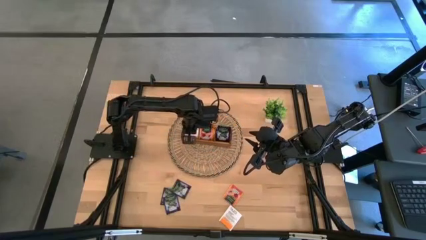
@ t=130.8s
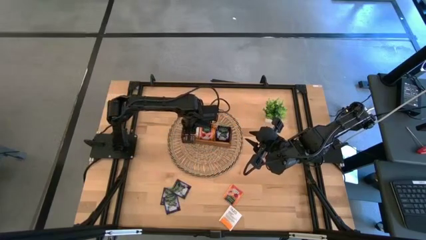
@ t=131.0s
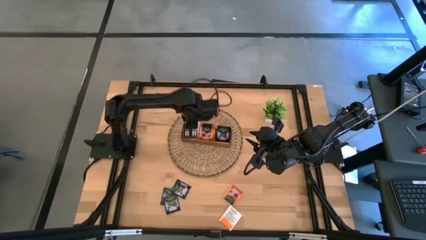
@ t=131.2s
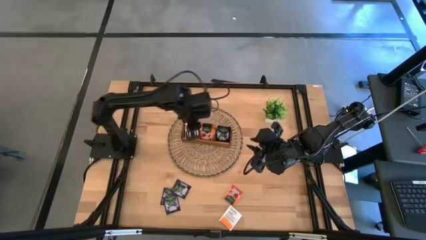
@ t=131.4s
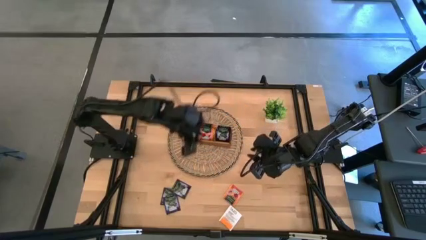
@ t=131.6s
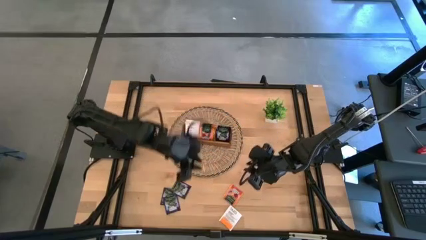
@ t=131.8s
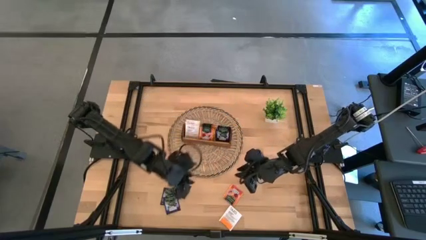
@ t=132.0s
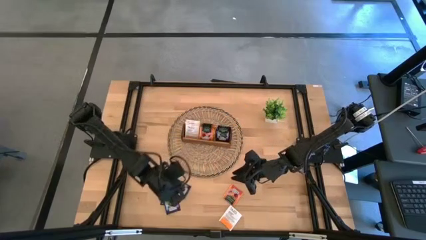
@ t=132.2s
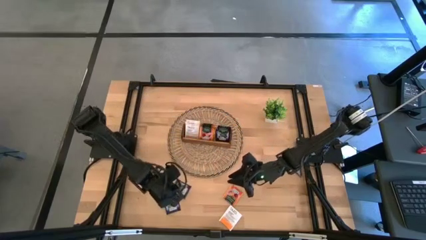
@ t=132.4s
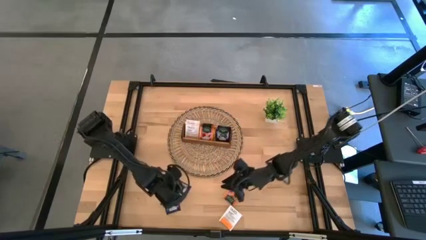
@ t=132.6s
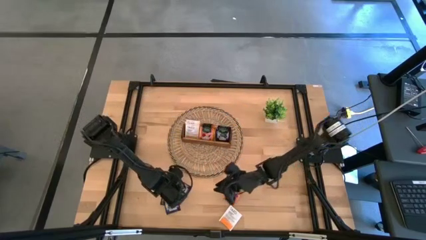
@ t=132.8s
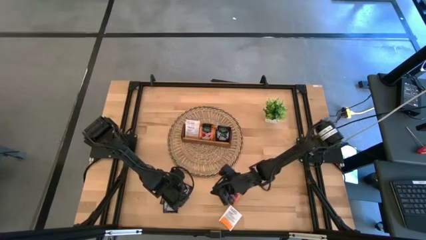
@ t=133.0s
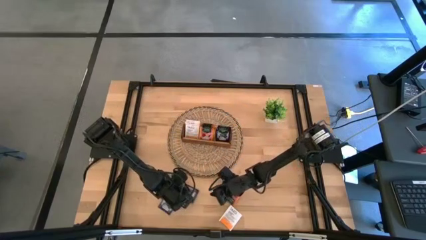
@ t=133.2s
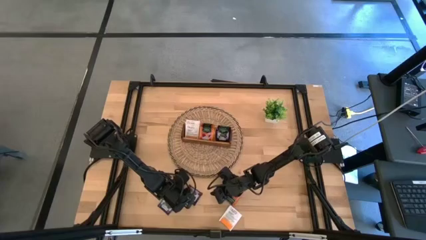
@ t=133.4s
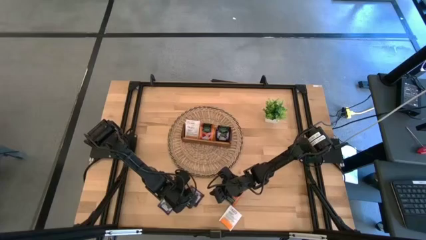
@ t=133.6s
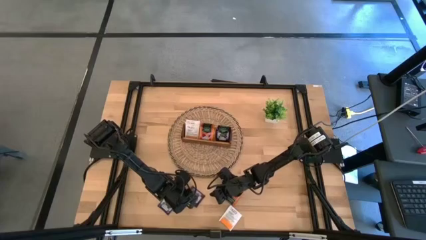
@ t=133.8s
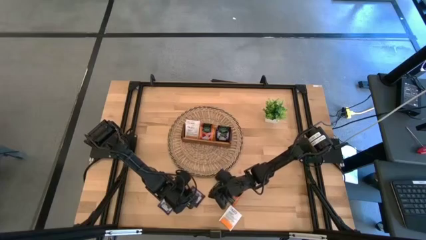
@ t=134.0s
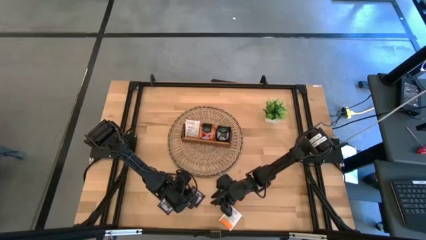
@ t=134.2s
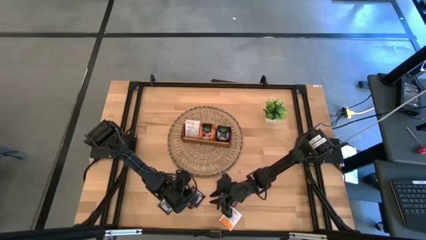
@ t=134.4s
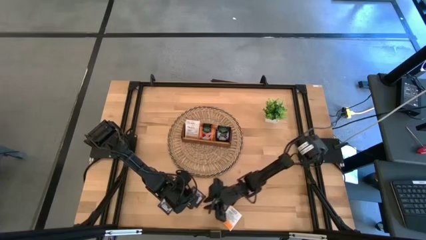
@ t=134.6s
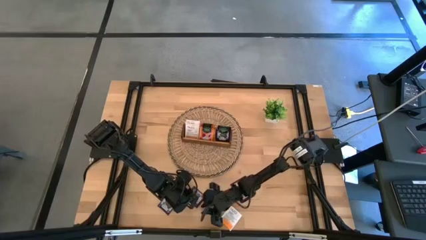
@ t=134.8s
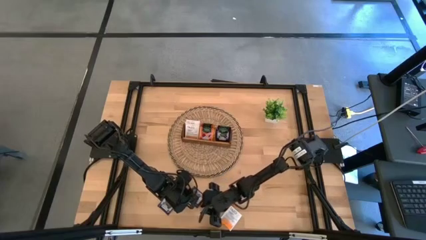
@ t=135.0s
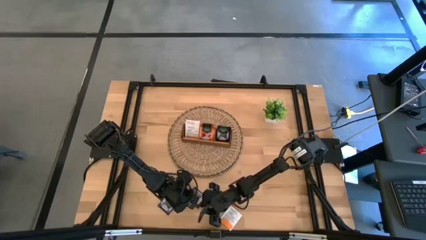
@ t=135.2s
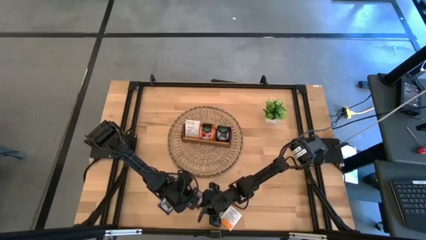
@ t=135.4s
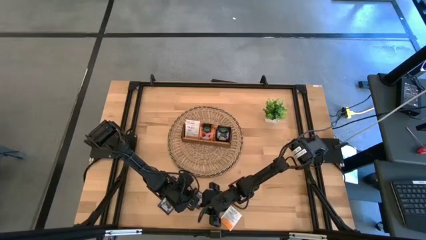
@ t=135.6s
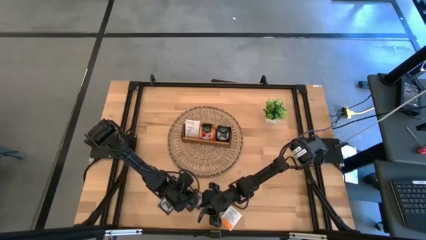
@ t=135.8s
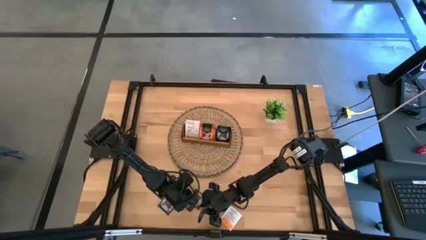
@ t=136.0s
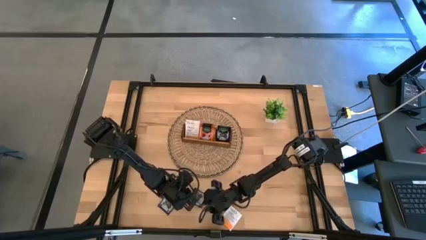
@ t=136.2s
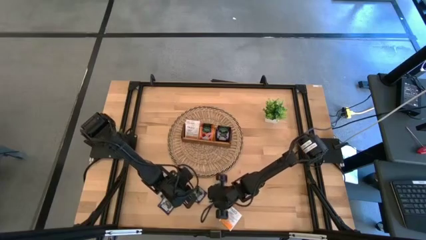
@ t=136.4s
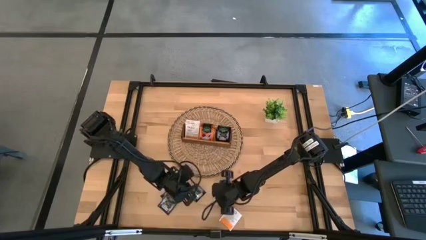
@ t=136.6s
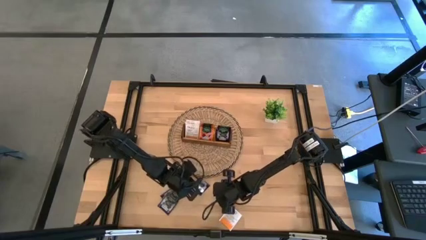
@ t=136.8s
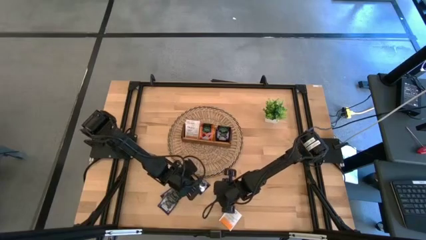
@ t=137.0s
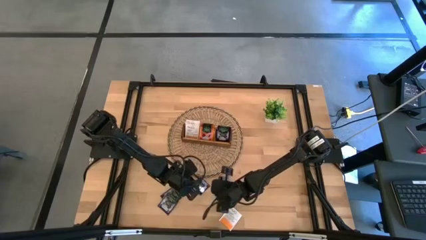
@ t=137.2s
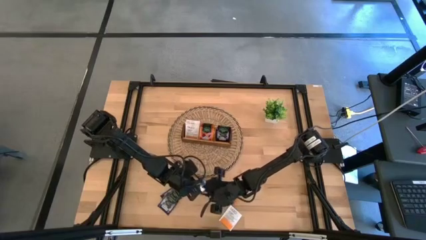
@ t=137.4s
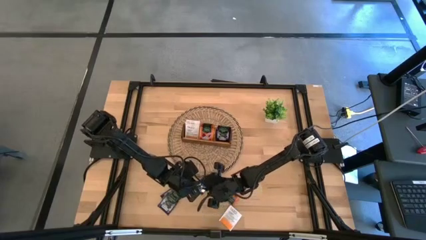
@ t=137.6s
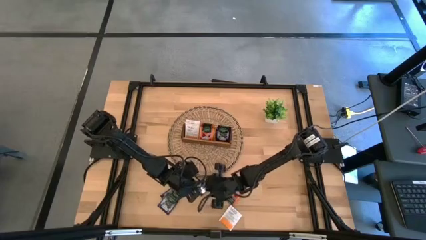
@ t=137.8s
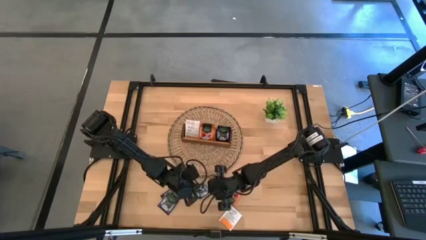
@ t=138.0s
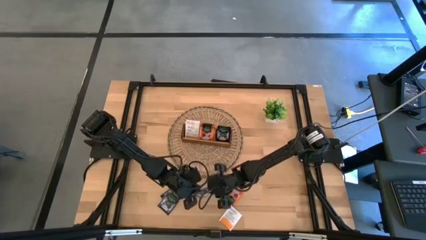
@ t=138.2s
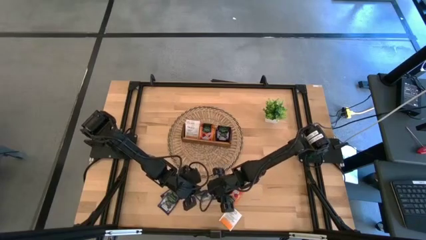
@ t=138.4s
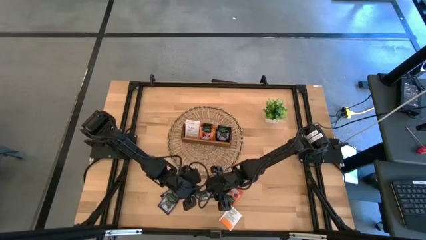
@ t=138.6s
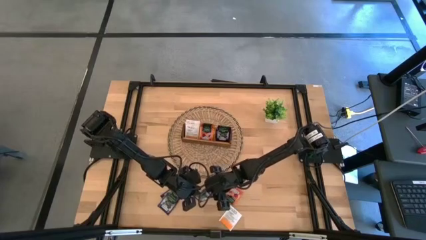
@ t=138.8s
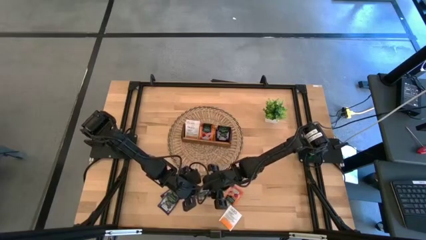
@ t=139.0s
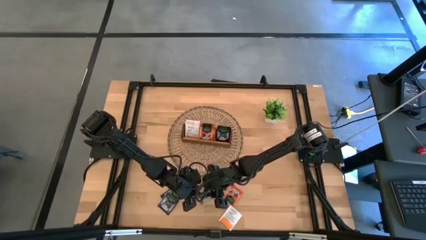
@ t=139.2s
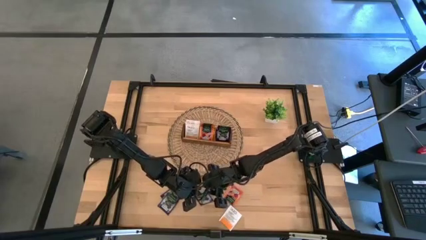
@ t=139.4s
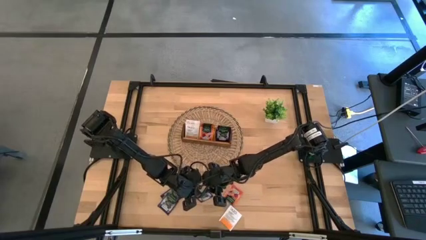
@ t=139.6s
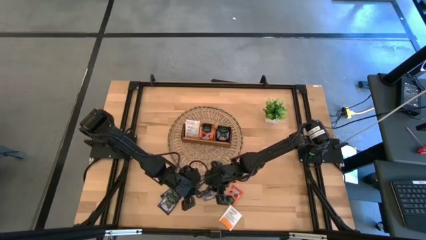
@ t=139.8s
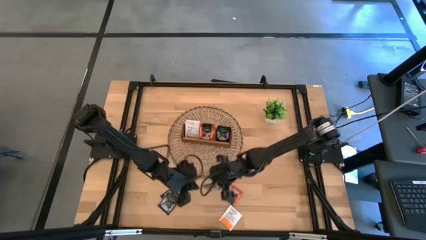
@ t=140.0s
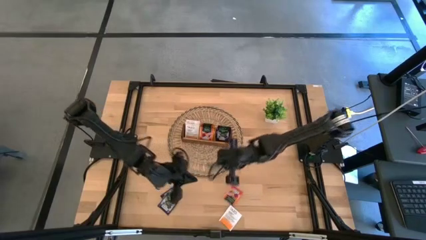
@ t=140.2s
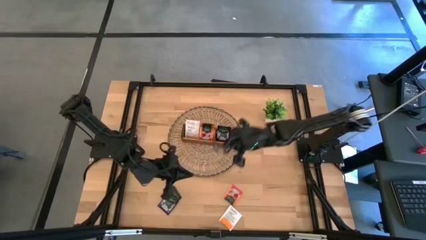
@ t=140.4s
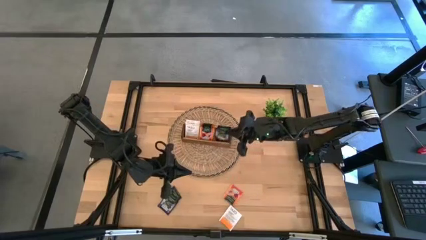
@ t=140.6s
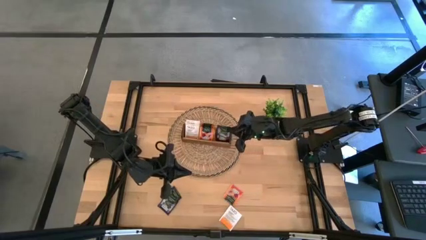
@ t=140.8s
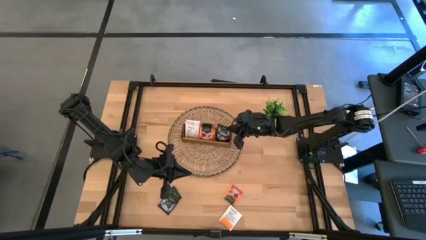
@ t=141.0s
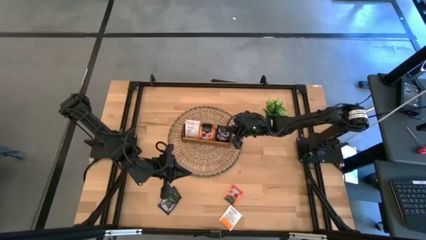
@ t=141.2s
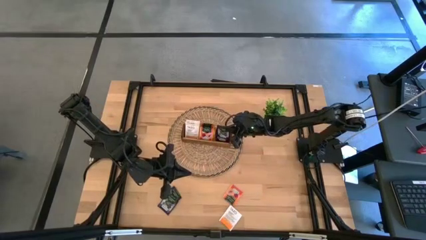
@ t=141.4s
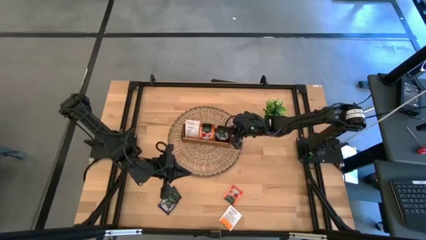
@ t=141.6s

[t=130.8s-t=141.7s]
Task: Pick & Place Tea
Put the purple tea bag into the right section of the wooden organizer
